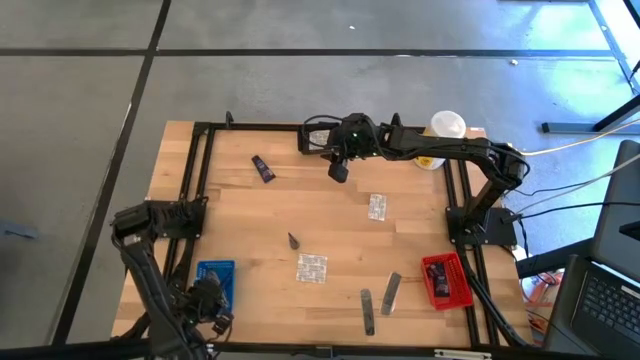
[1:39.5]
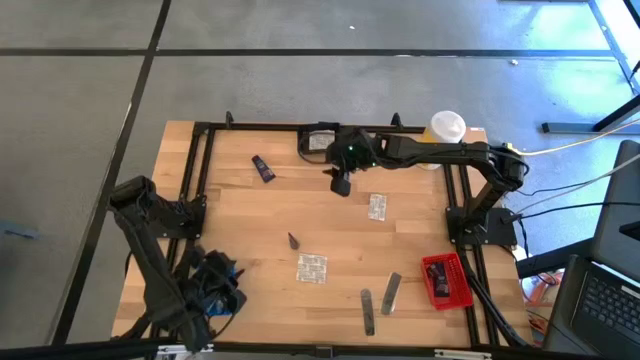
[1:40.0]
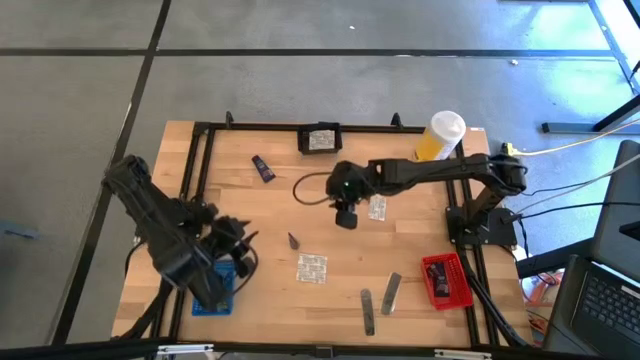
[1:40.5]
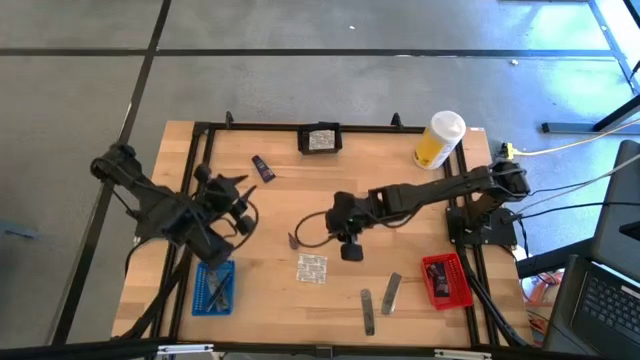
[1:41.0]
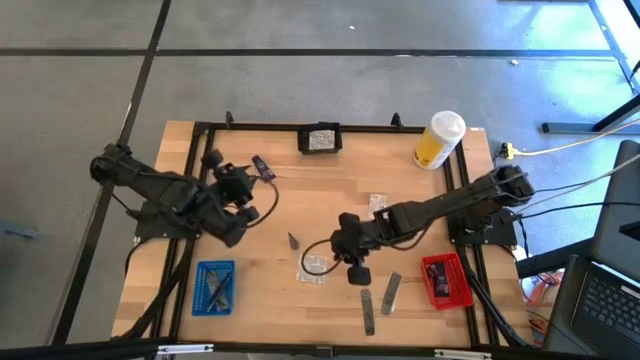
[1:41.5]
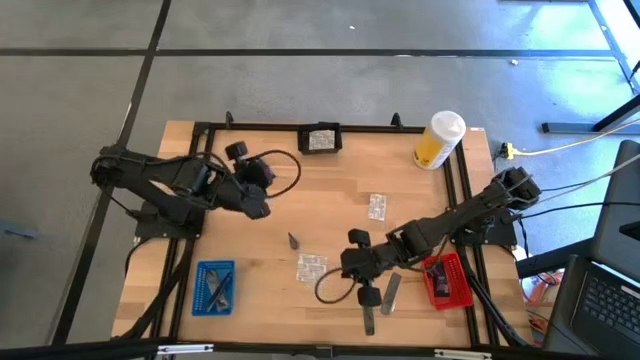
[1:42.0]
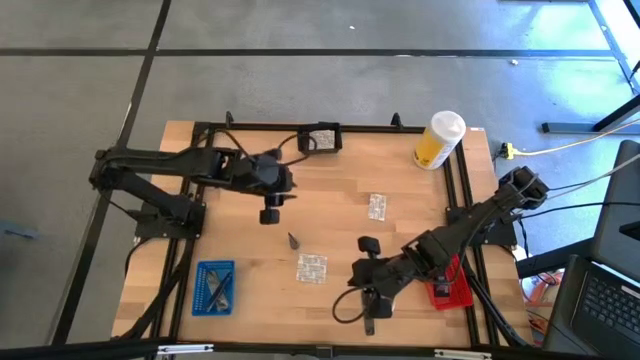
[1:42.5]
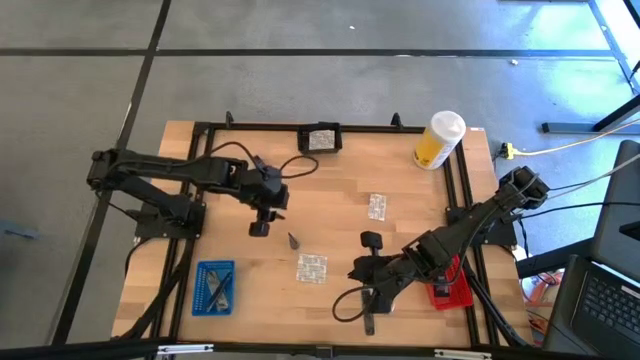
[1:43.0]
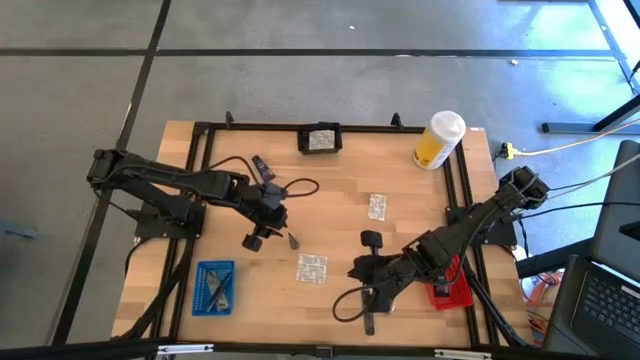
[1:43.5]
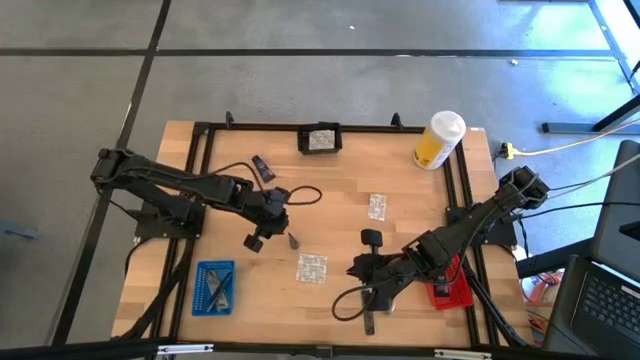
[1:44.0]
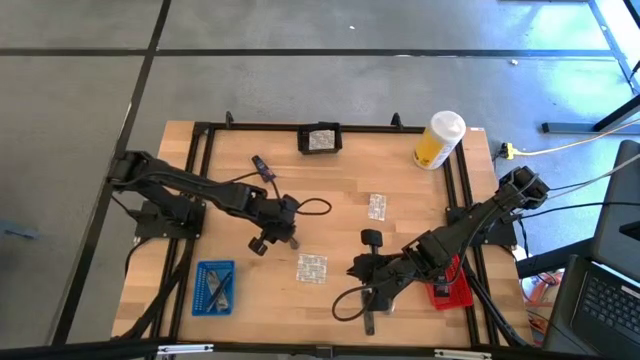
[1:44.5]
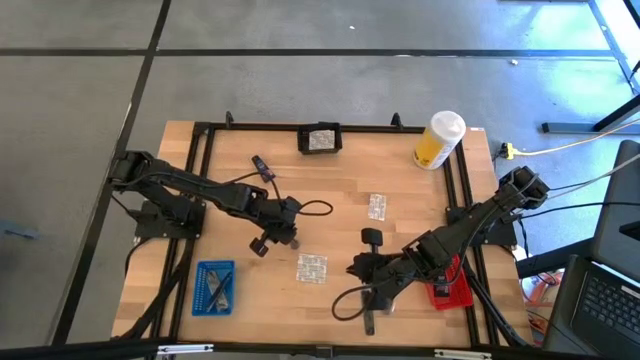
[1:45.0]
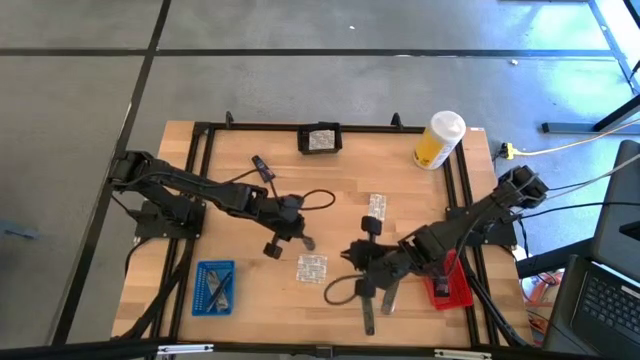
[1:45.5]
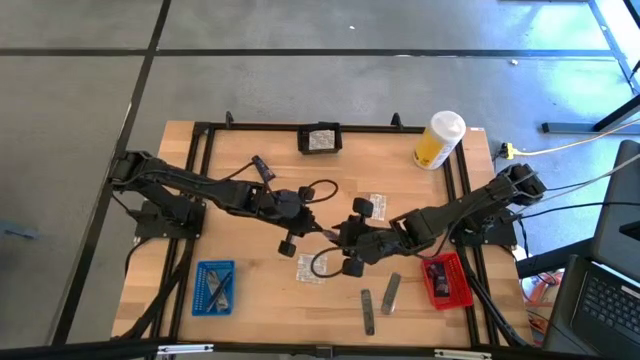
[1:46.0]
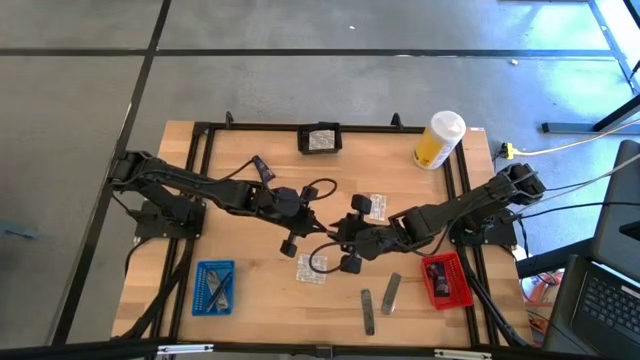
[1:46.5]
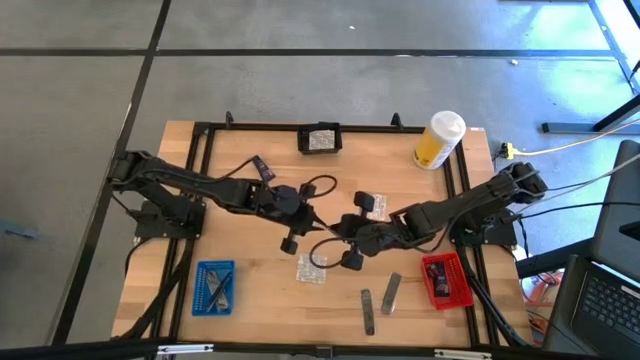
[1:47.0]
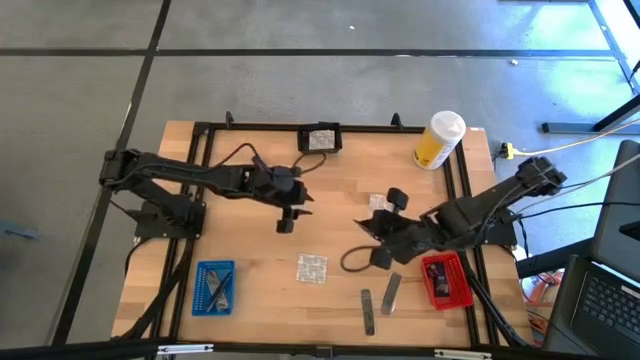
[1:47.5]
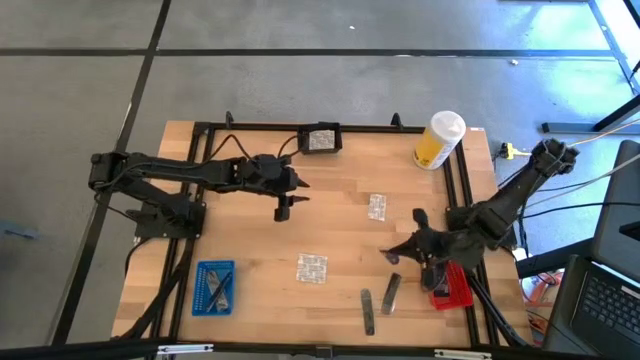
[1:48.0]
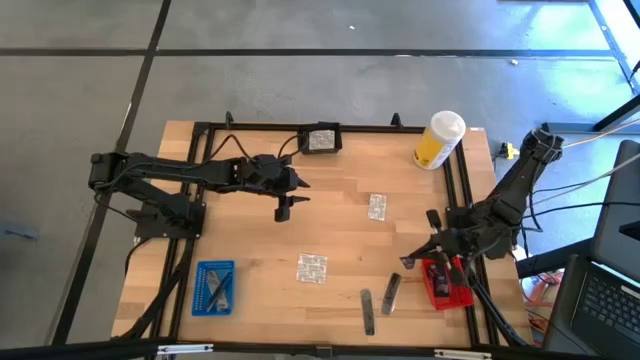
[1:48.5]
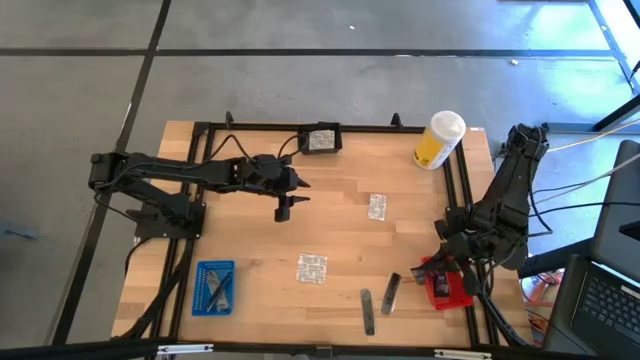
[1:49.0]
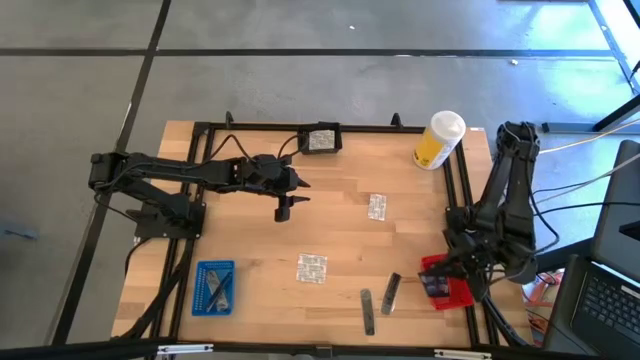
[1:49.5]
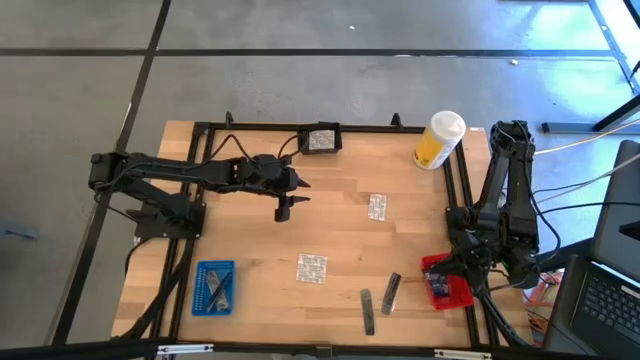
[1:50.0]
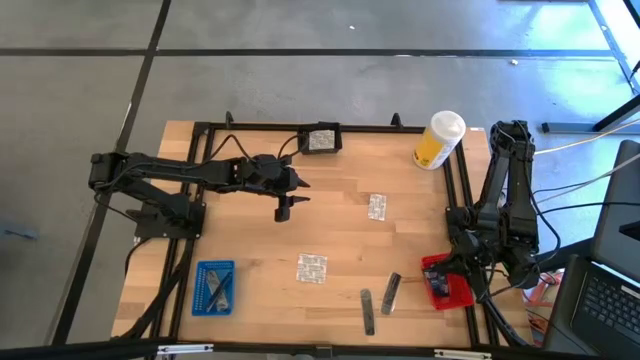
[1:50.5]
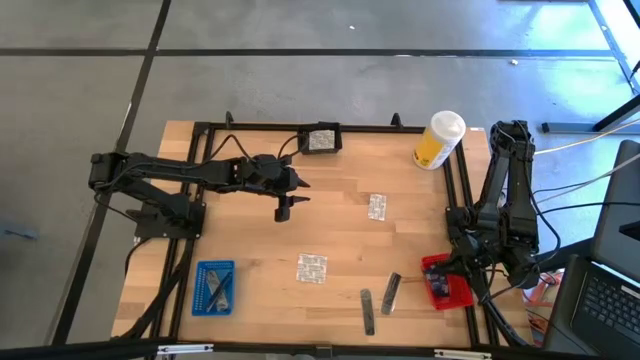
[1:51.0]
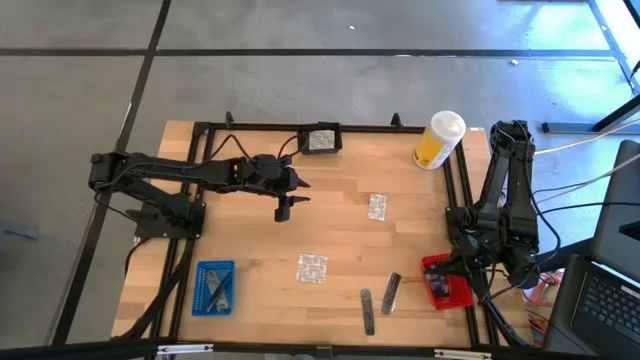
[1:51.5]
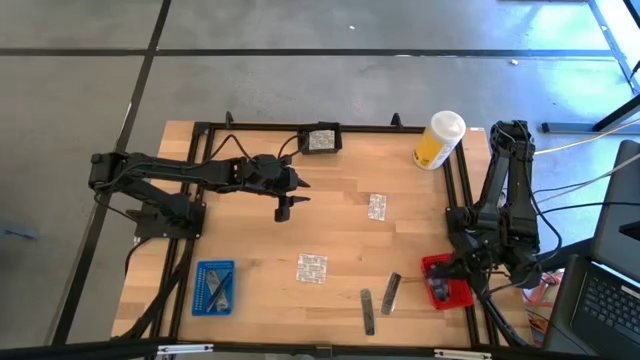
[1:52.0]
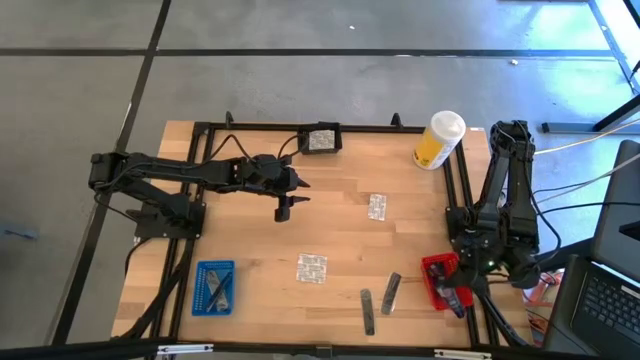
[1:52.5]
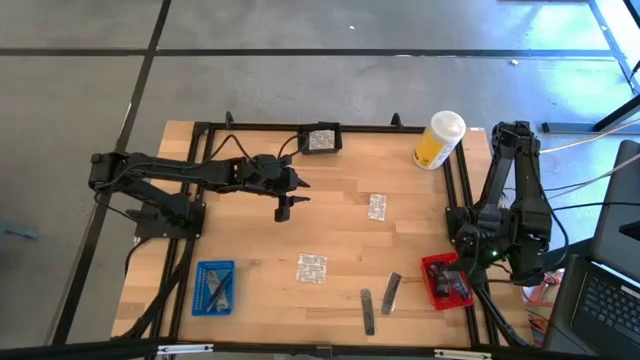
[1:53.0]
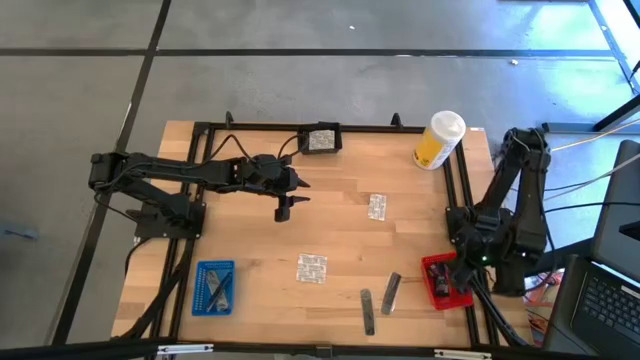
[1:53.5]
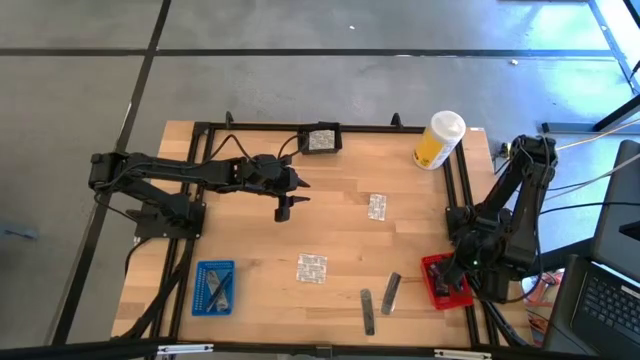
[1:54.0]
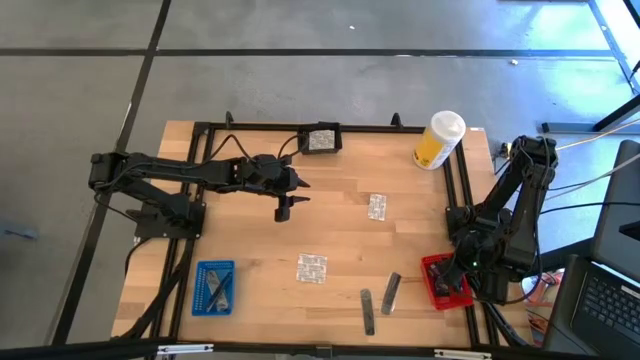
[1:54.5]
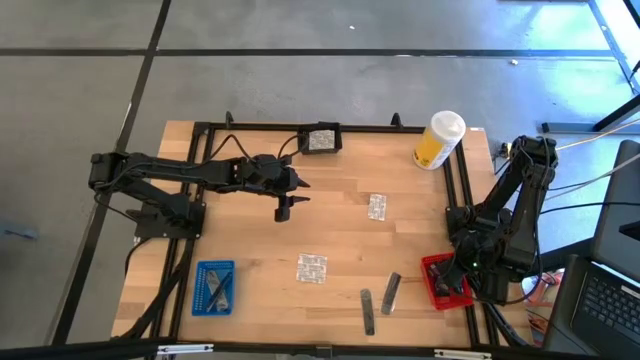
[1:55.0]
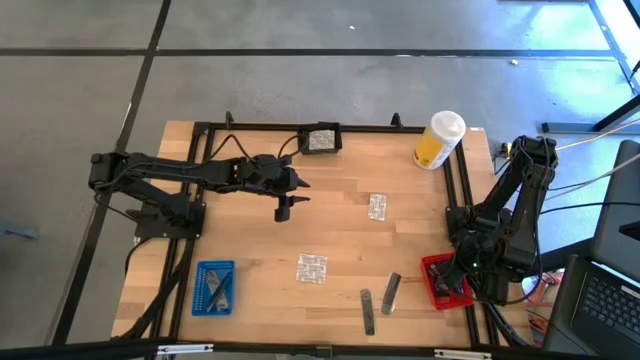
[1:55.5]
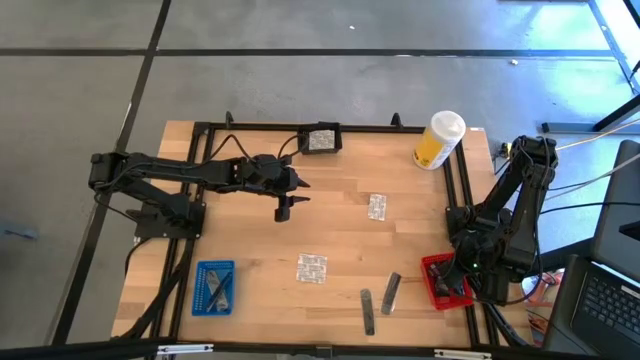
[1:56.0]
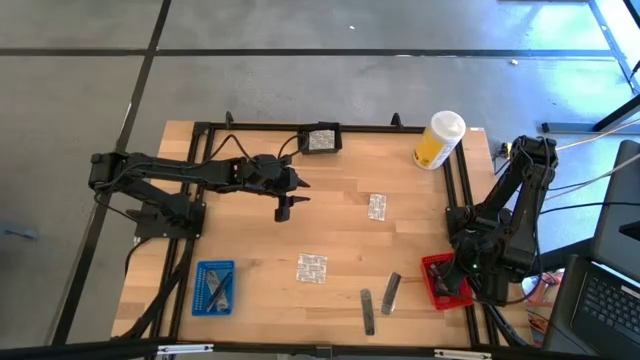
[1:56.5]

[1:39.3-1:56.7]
Task: Pick & Place Travel size toiletries
Put the blue shave butter into the red bin

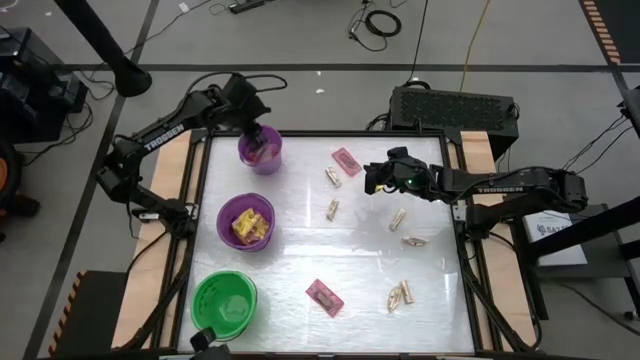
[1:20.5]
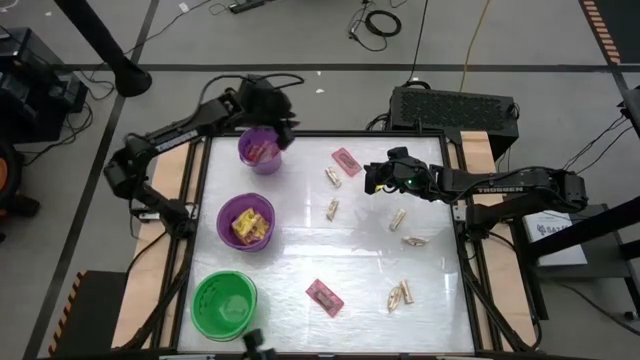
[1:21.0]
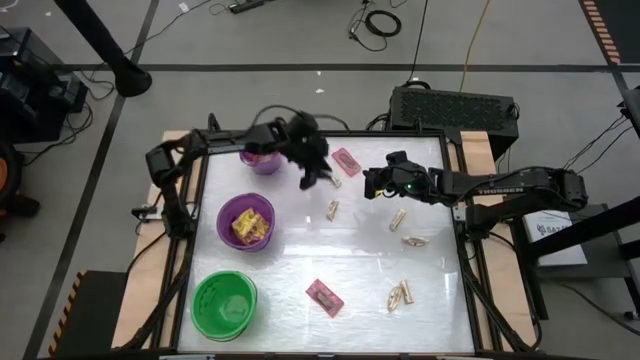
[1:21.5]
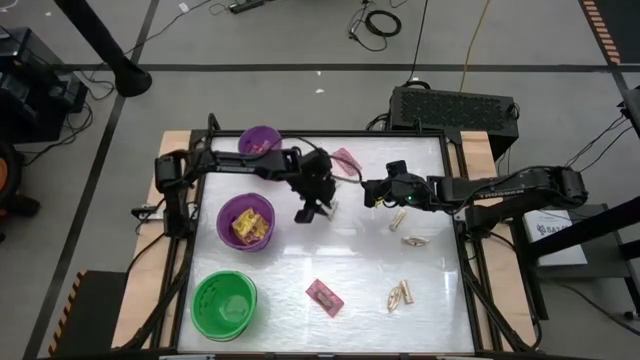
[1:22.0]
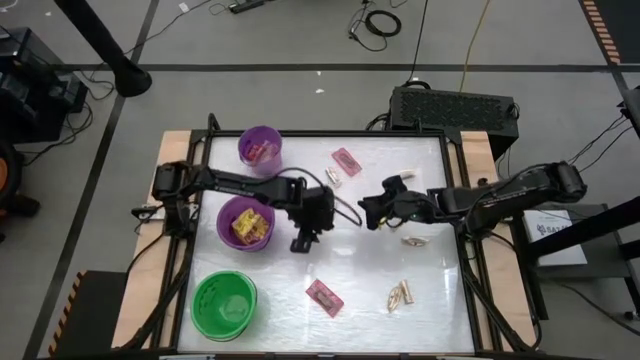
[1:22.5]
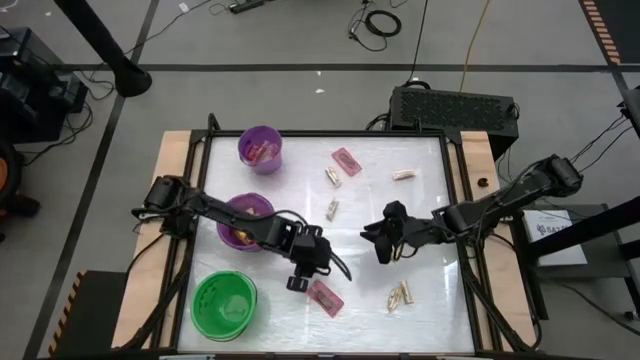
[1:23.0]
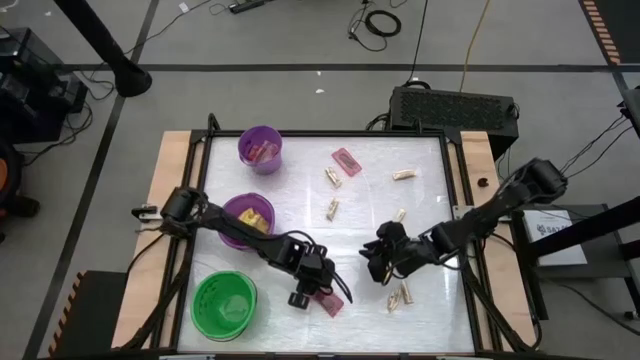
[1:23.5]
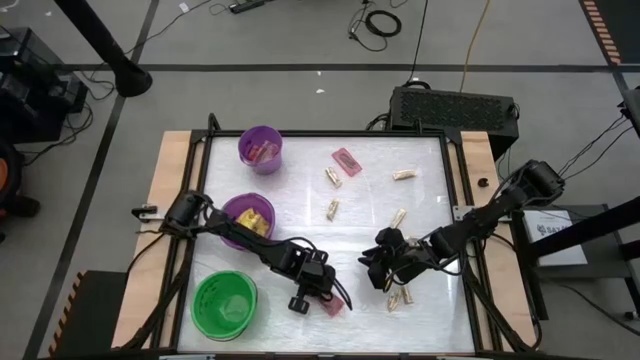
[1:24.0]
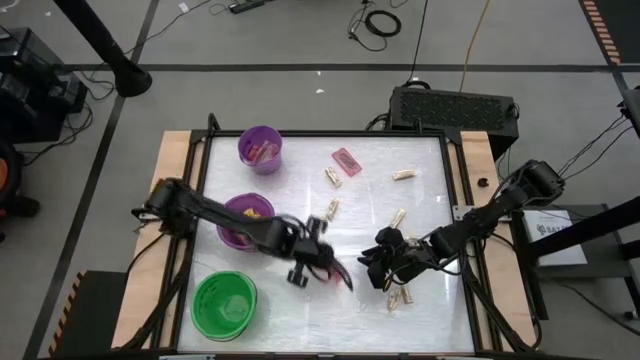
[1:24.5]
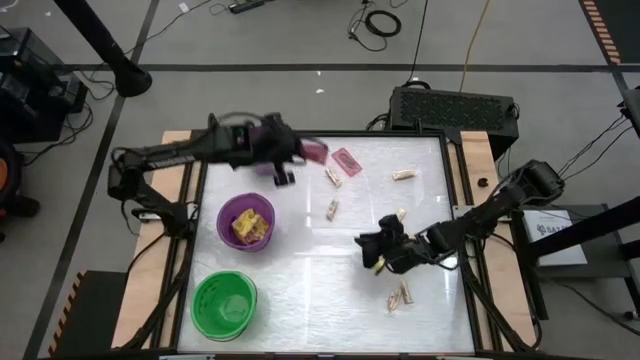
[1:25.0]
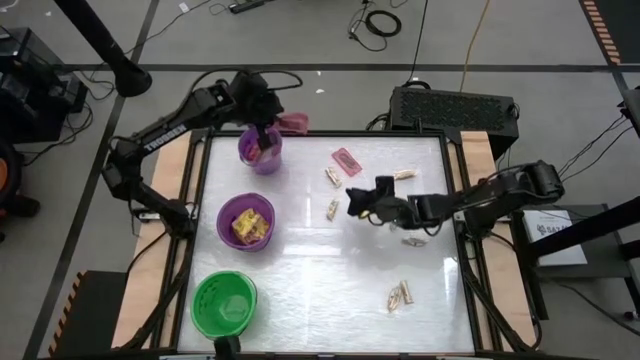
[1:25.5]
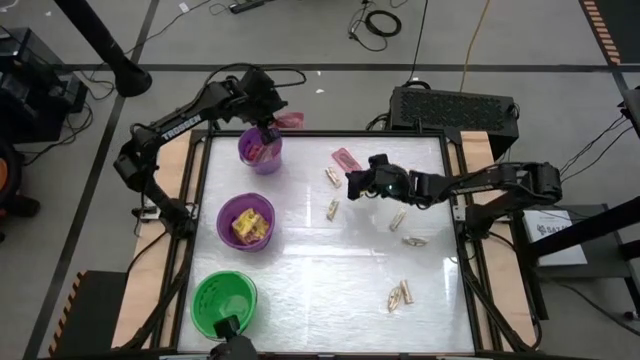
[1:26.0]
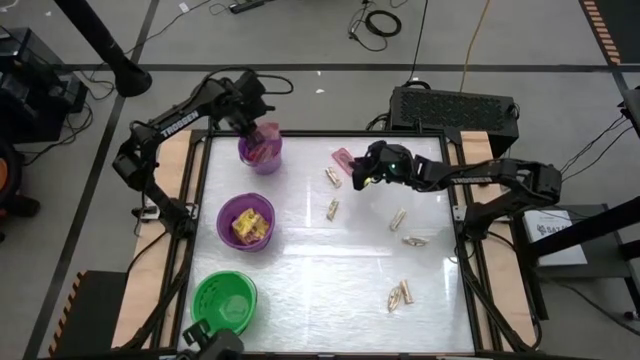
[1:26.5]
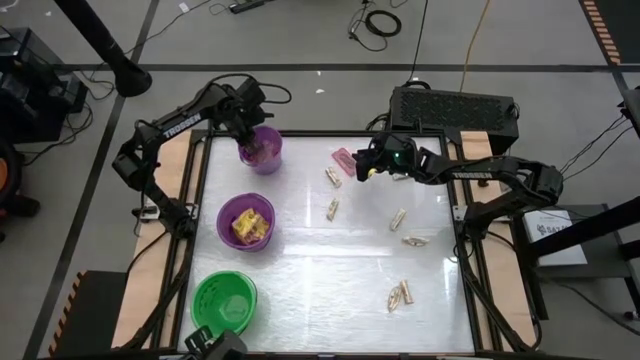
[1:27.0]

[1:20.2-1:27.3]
Task: Sort candy by brand, put in halloween buckets
Put the red candy into the top purple bucket
